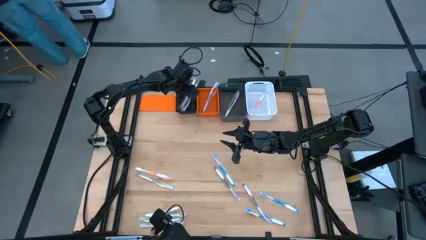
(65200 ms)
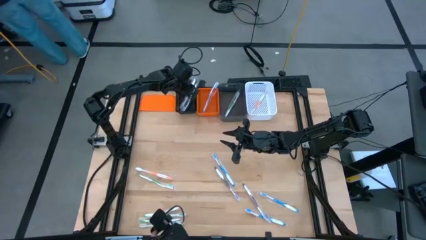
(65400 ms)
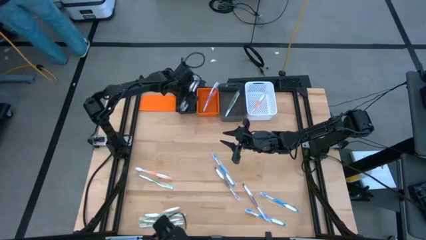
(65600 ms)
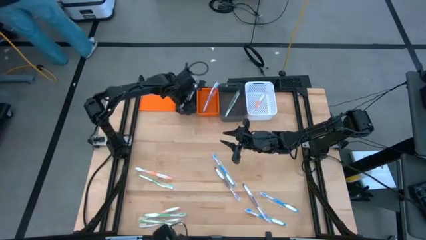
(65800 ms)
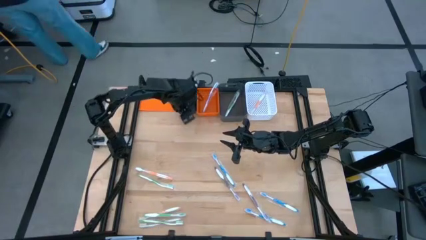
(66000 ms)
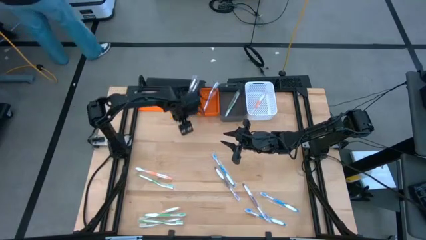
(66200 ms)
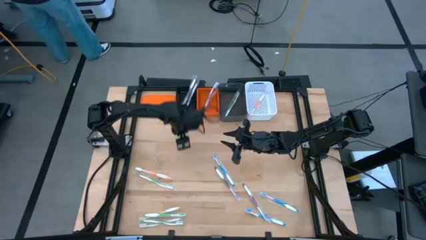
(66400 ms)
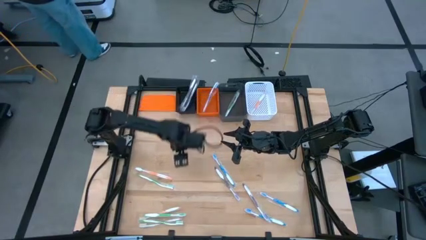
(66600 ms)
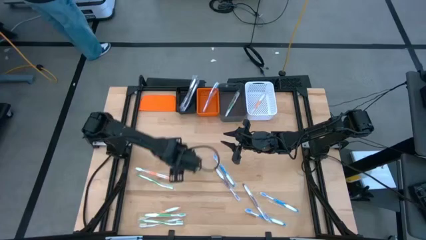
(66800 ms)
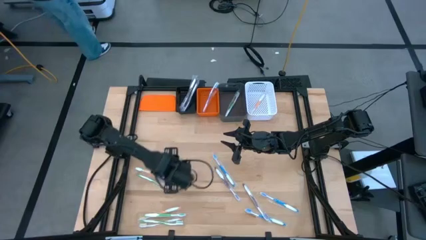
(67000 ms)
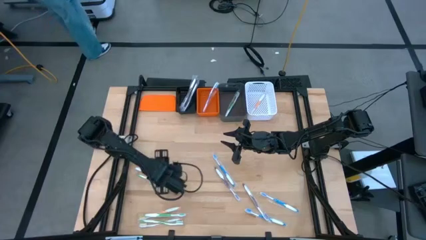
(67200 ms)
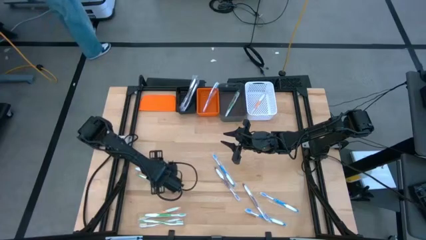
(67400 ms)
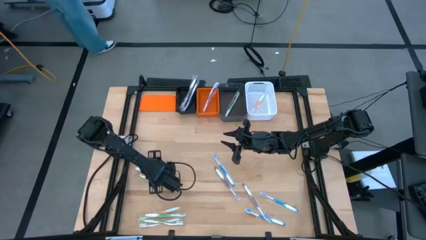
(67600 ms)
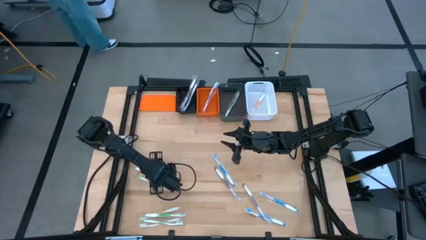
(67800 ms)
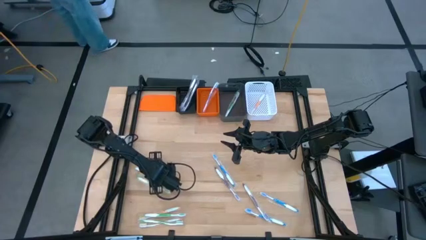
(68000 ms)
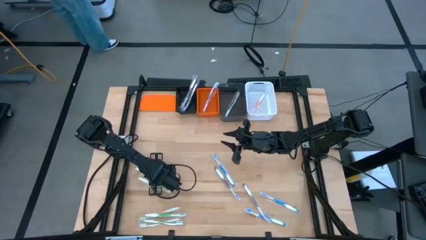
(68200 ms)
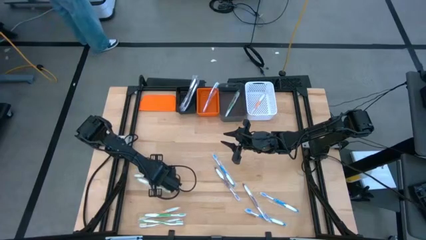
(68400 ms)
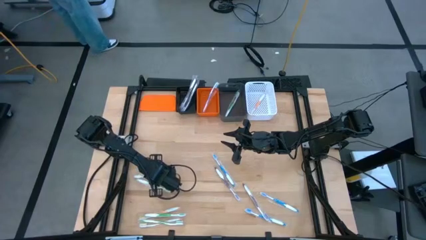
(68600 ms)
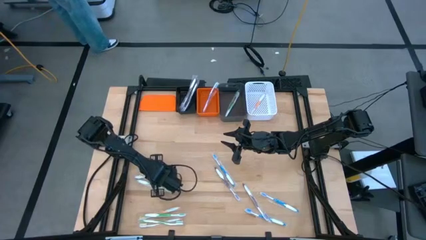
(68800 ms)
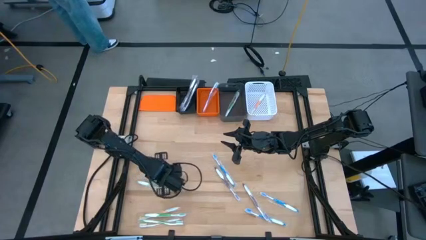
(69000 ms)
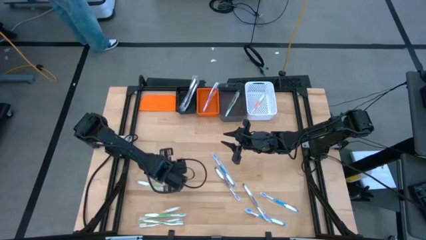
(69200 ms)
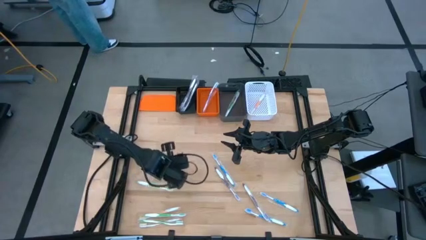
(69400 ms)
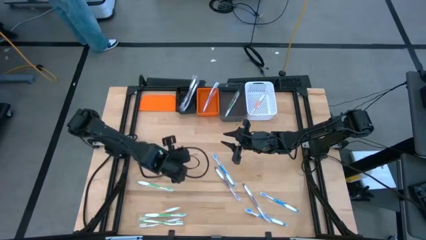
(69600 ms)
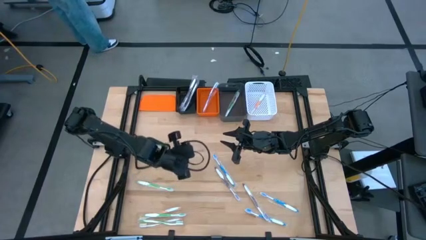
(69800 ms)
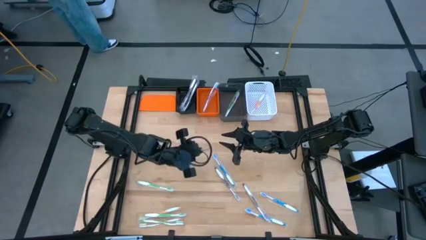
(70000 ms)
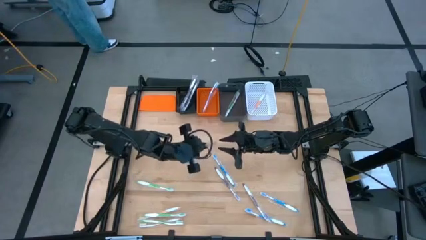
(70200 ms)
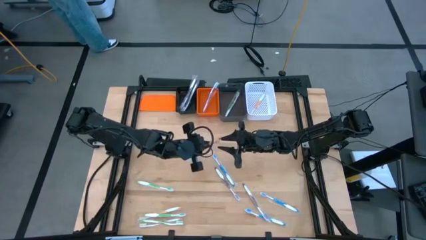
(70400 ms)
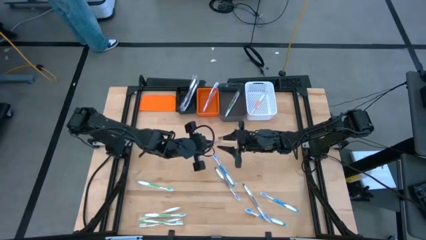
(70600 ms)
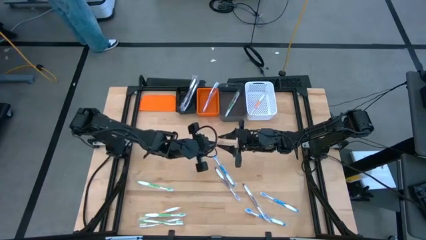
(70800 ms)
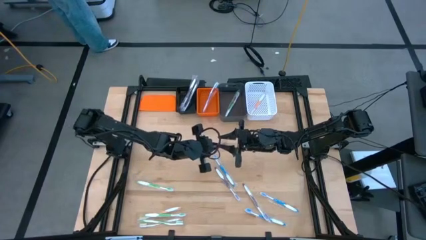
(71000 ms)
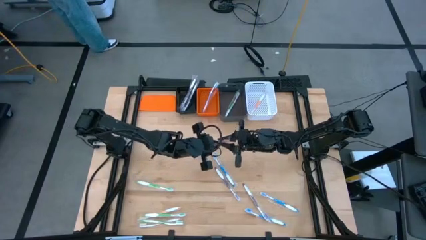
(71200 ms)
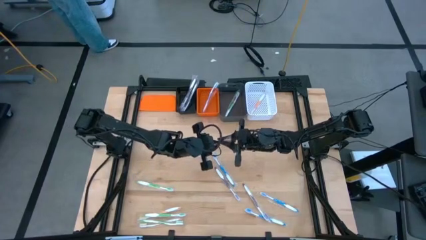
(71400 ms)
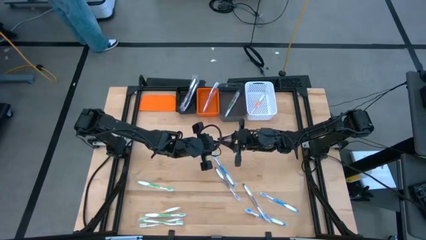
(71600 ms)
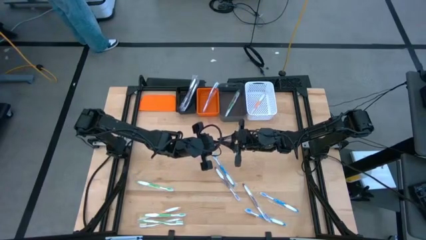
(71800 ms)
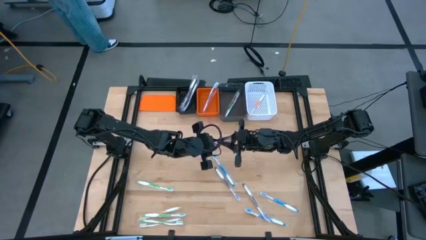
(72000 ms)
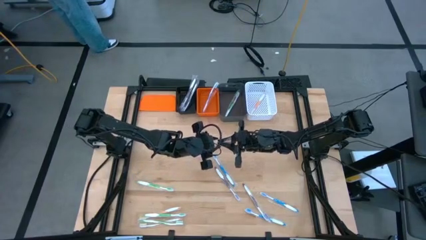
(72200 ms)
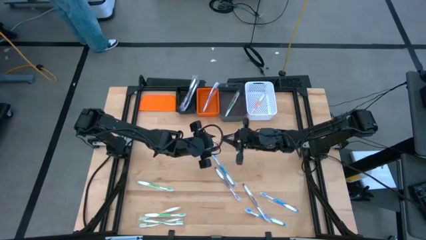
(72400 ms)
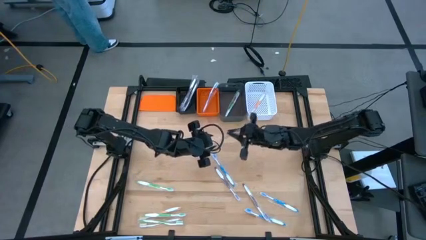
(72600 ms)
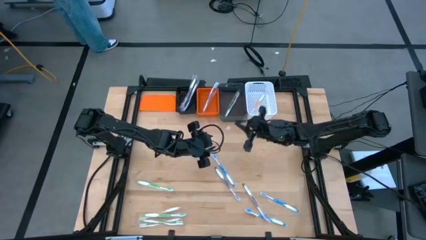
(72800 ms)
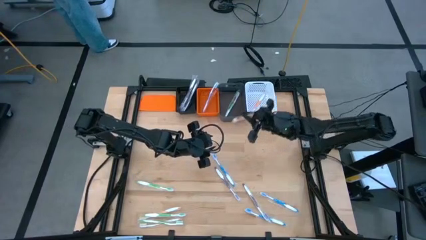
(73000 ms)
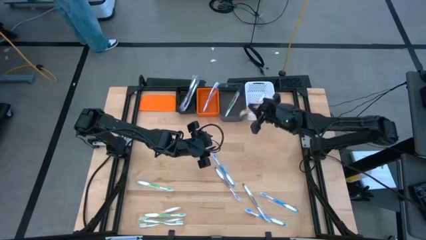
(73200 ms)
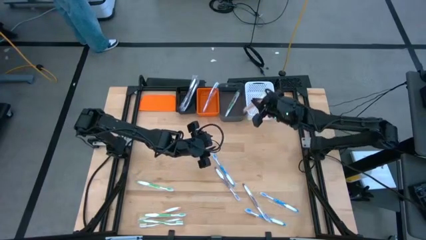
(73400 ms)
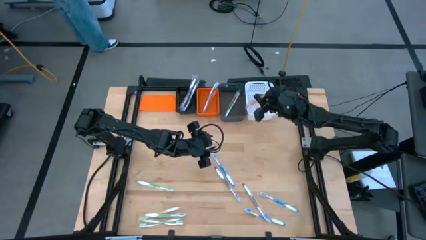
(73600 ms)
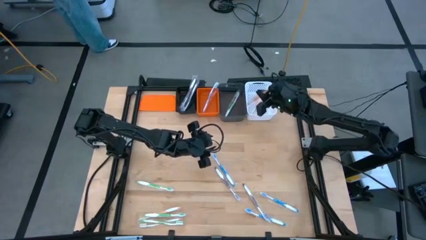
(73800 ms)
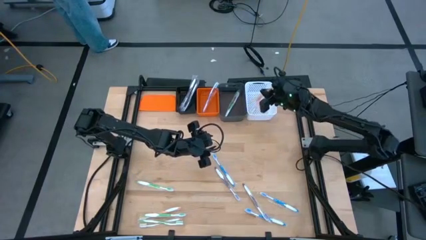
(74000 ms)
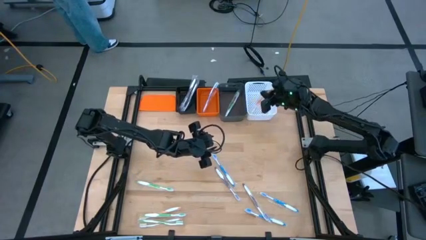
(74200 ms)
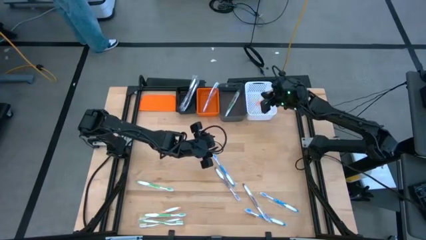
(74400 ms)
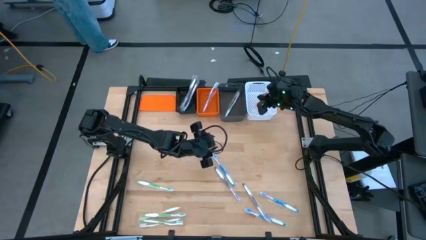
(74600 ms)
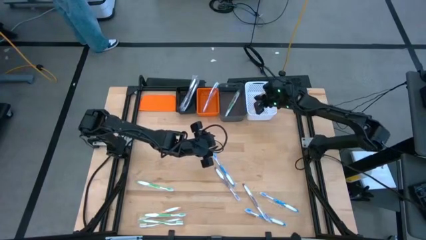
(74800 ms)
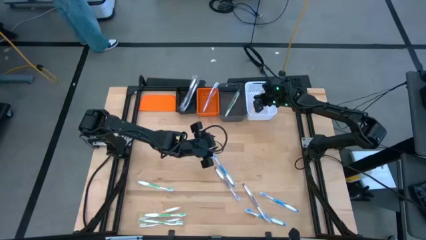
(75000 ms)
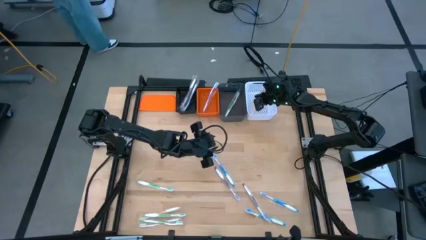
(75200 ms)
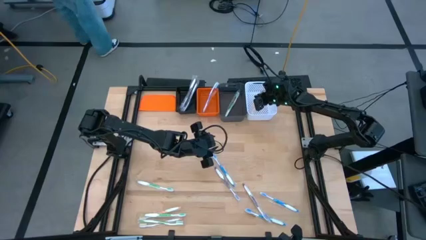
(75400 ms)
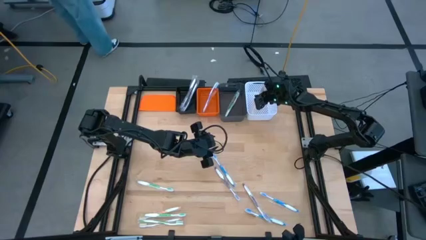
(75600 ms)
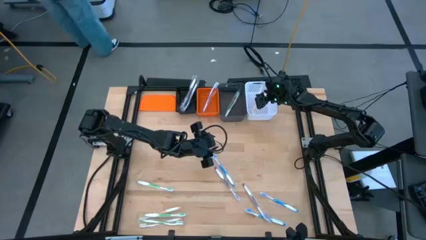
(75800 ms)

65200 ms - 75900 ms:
Task: Pick & Place Toothbrushes
Put the orange toothbrush into the white bin

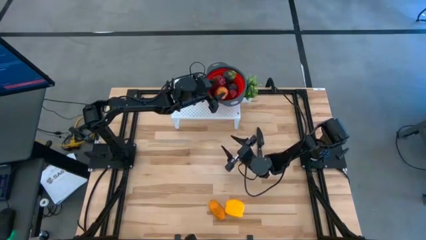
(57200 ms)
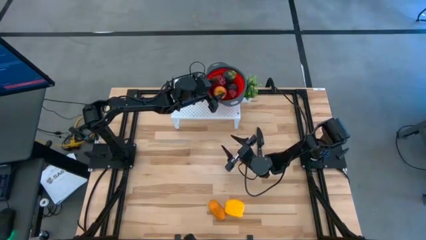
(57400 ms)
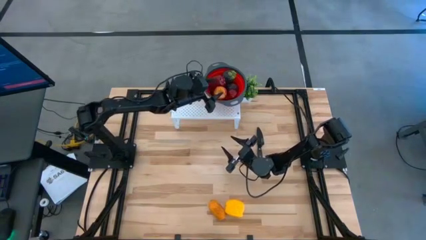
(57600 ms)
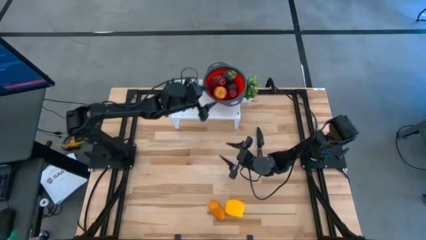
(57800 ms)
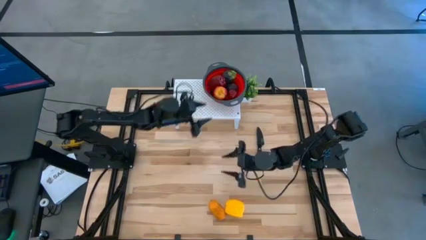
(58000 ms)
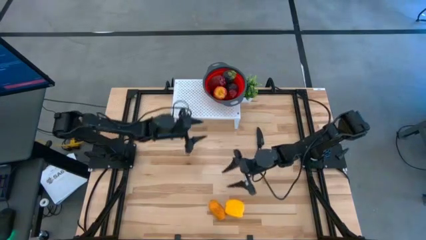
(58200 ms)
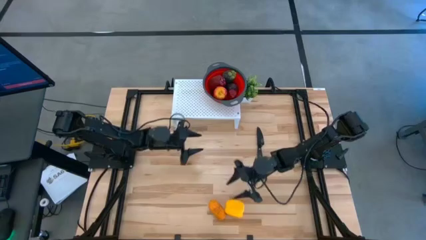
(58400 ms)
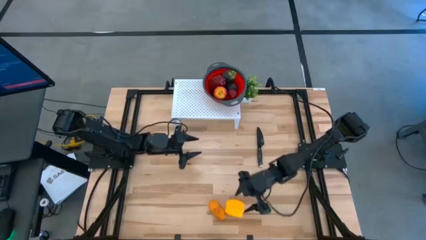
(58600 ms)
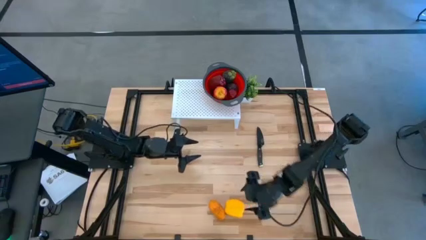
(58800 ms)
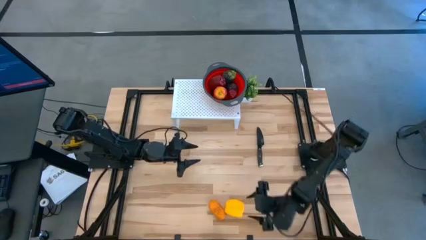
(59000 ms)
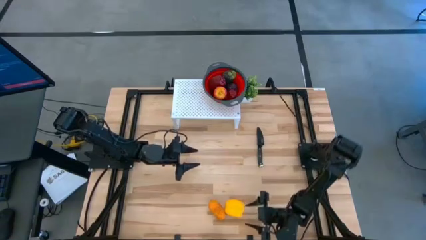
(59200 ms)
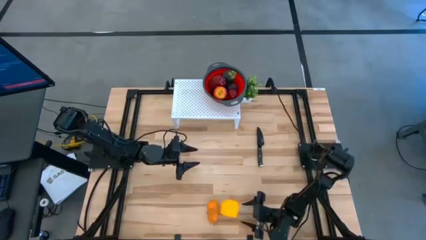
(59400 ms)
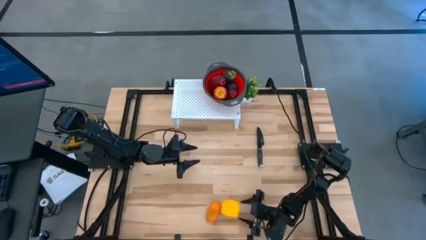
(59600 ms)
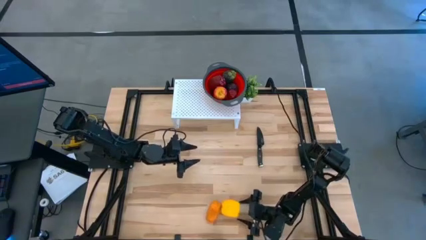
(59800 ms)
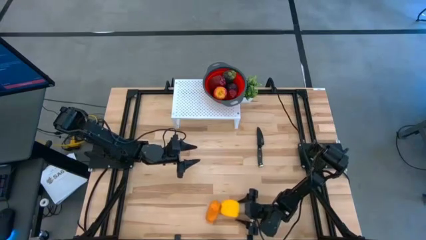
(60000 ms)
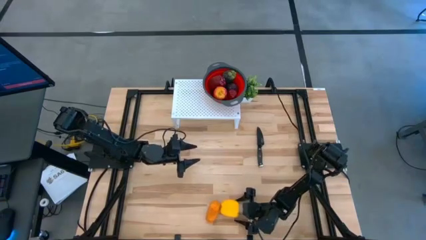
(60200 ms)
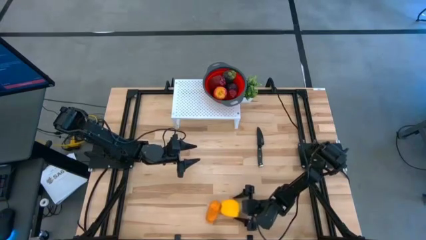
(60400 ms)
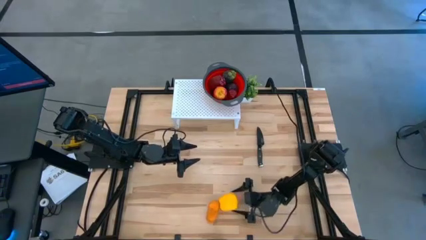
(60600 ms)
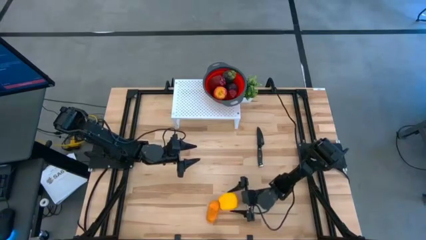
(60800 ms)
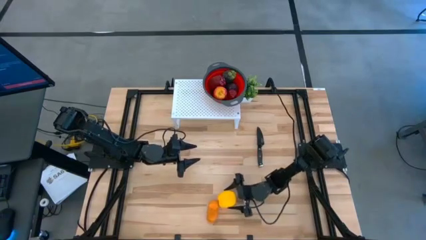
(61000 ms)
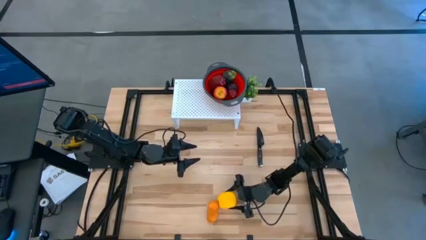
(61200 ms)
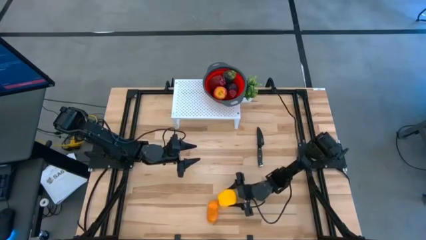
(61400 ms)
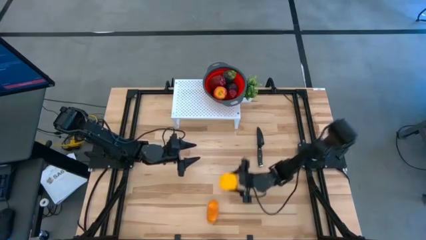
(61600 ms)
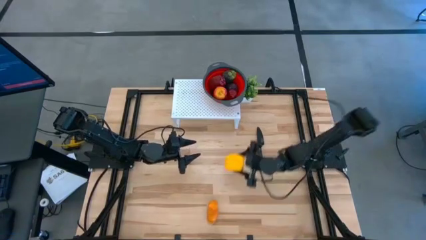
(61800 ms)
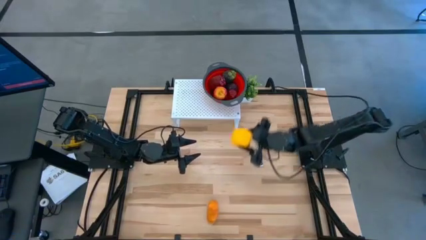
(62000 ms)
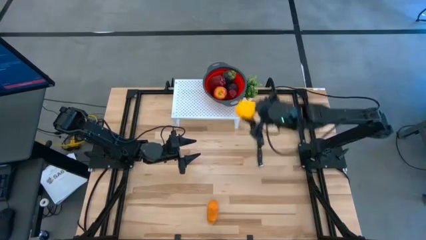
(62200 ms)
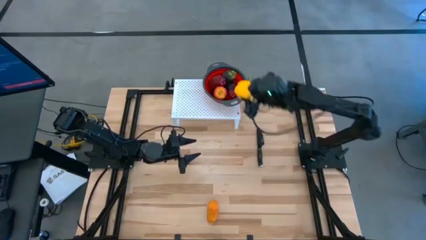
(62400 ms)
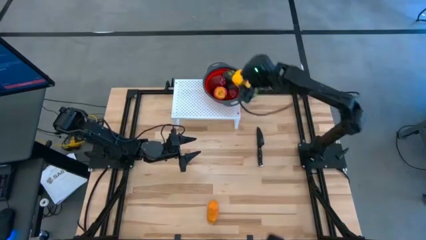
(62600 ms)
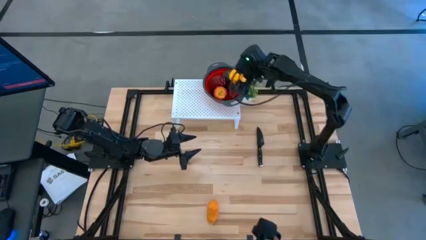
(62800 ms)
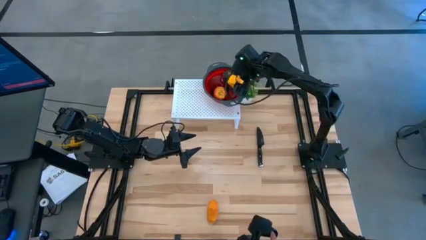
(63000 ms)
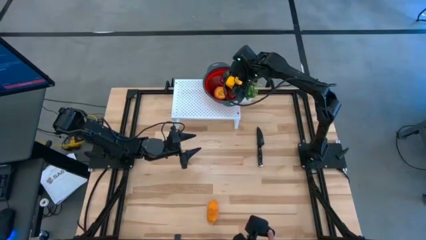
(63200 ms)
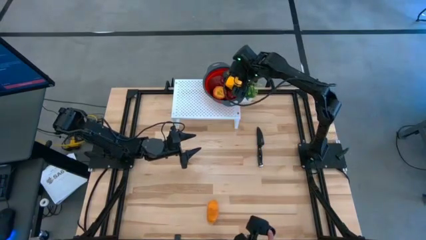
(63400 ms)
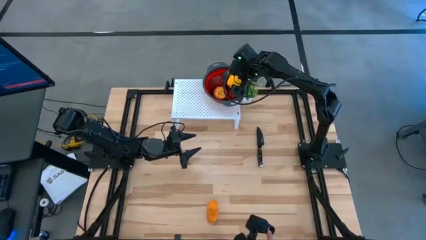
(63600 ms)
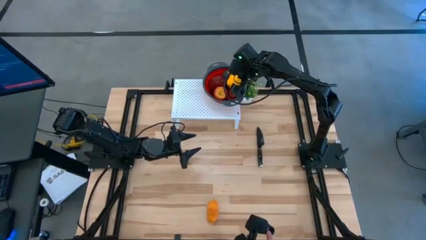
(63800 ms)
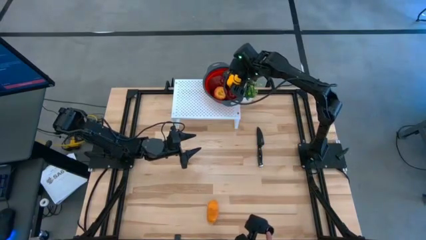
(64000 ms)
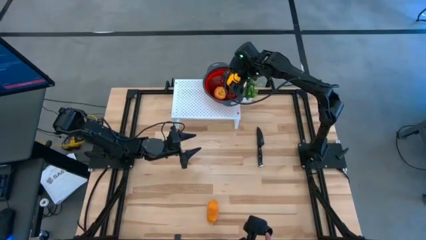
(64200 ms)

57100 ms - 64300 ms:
Task: Pick & Place Fruit
Put the yellow bell pepper into the red strainer bowl
